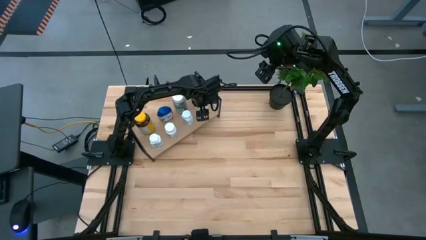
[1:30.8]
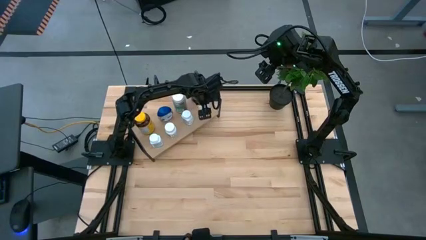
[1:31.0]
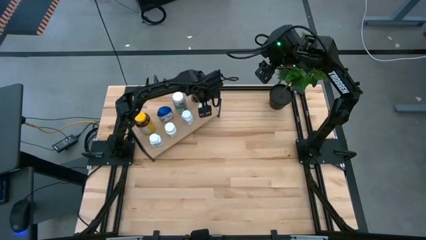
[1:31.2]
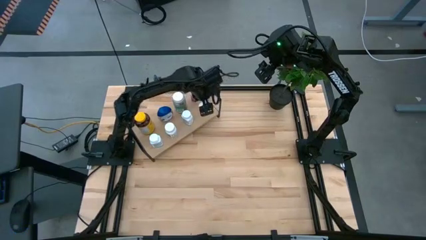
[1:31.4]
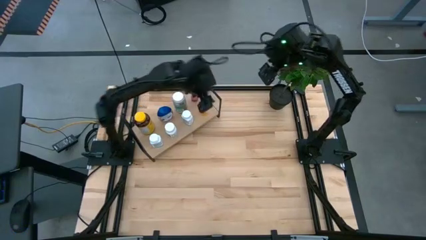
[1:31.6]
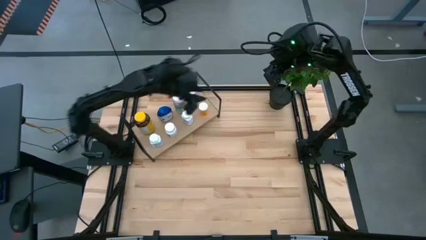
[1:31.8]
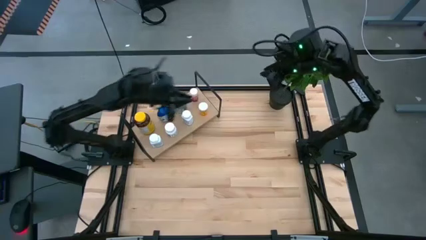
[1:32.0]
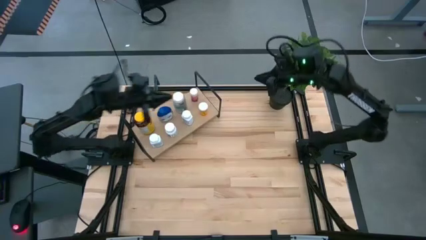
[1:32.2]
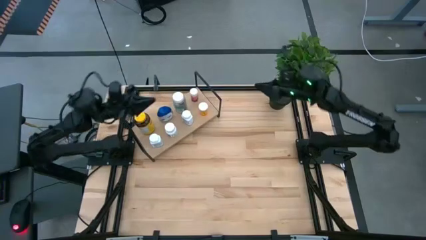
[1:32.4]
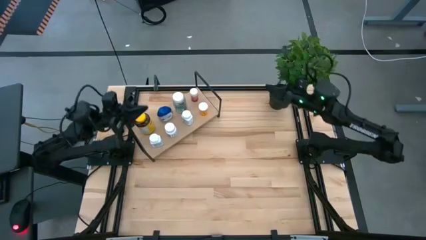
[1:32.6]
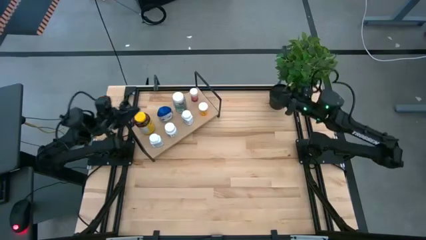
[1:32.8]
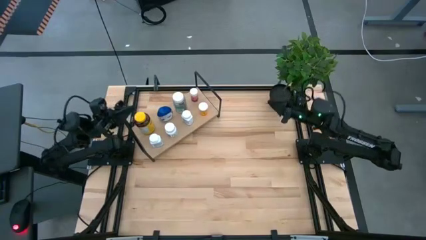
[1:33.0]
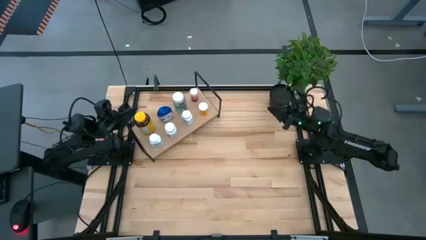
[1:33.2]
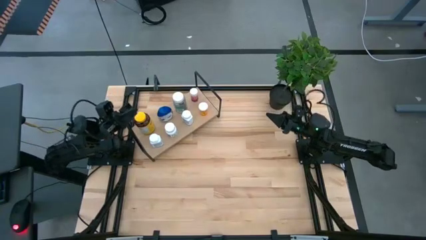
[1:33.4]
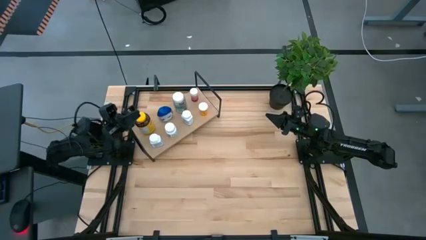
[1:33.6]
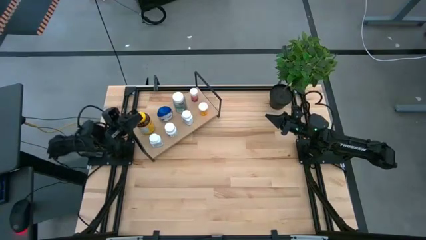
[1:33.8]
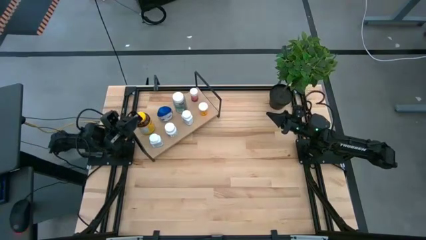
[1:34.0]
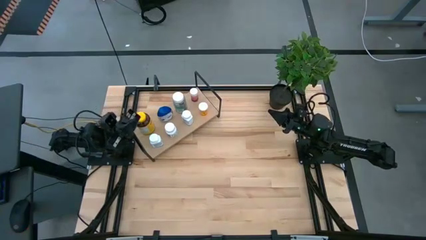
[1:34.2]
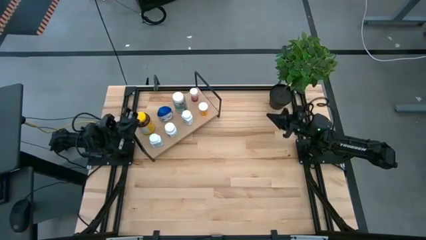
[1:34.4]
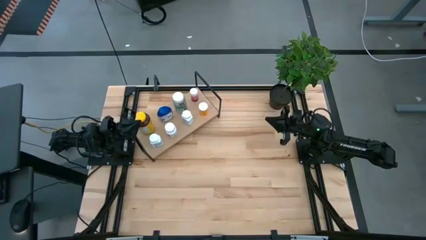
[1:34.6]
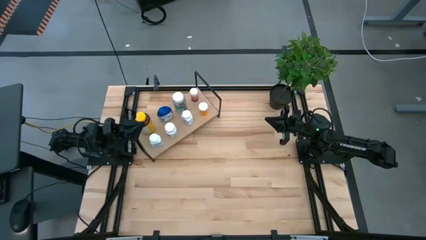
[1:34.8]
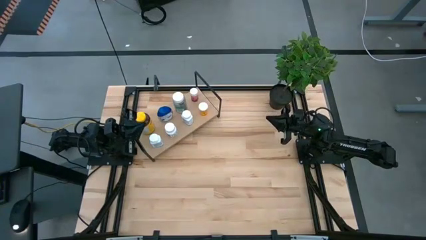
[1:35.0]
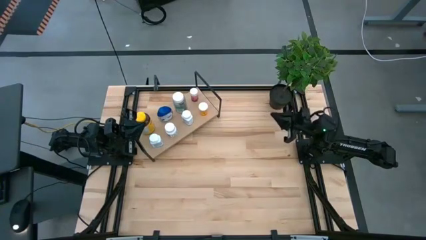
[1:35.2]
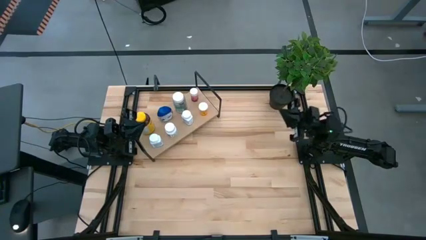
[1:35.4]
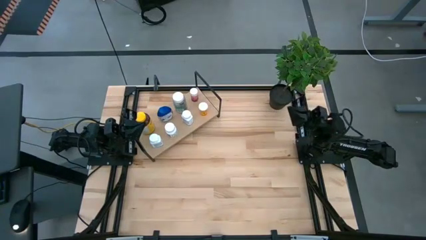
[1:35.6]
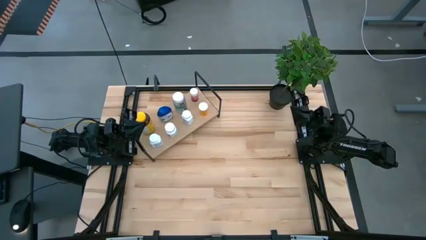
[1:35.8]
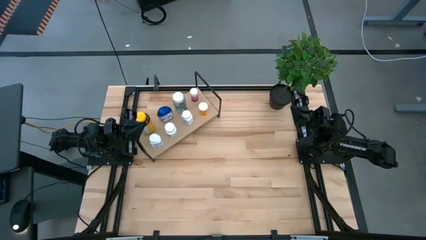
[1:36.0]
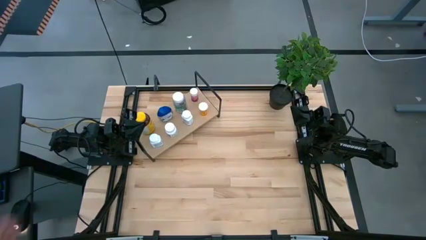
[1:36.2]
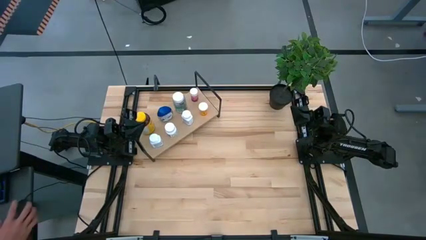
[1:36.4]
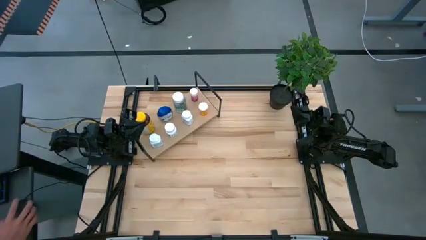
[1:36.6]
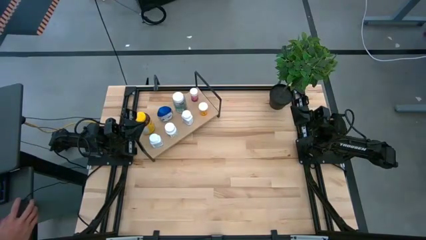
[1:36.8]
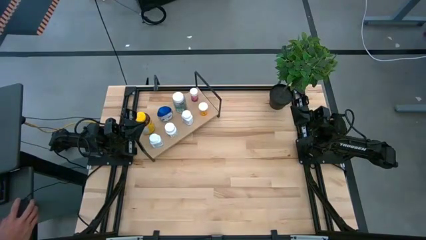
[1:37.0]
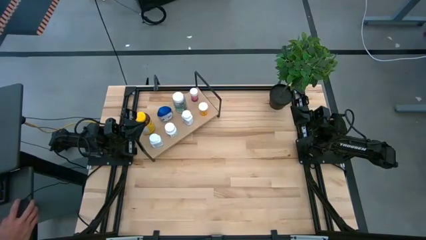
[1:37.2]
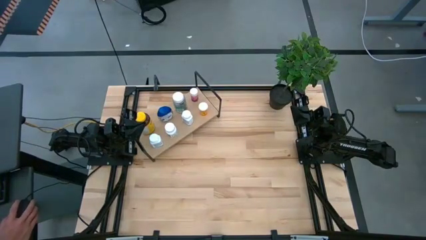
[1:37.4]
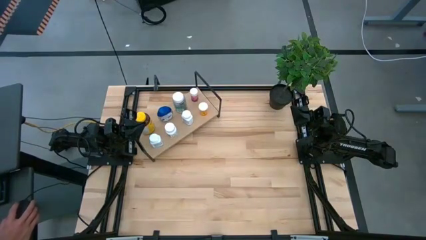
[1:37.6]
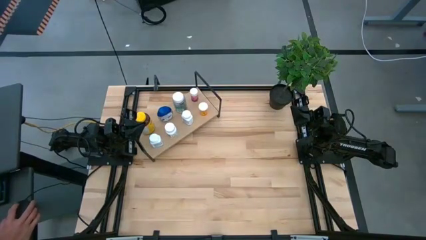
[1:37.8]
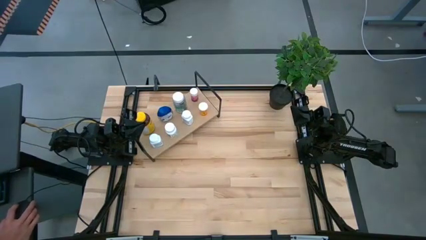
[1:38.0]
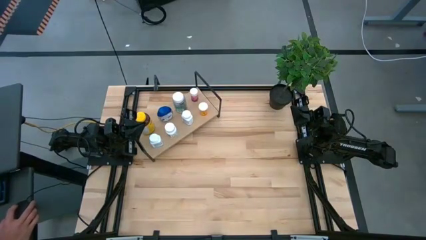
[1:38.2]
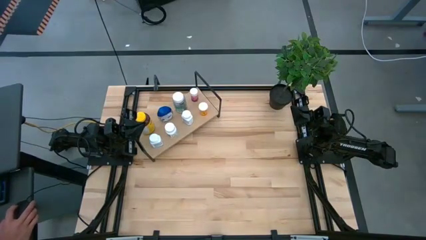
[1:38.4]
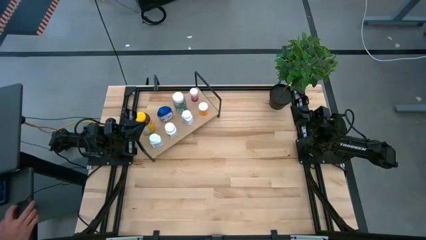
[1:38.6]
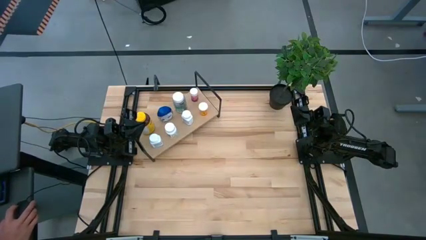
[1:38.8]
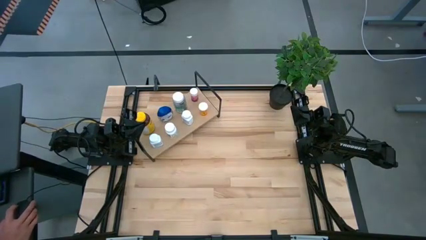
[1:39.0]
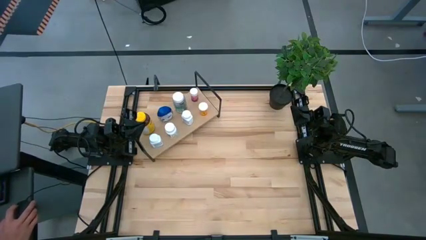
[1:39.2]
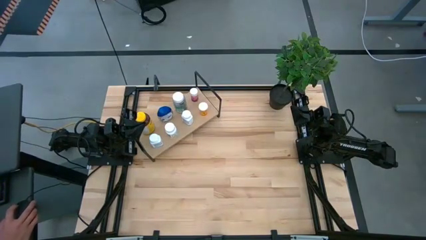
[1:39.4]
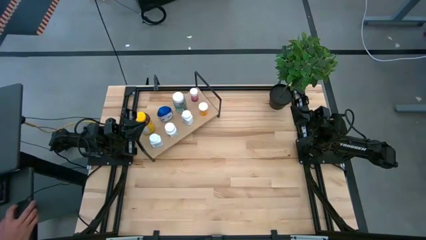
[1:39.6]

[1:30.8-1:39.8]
Task: Pick and place medicine bottles onto shelf by color
Return to Home Position

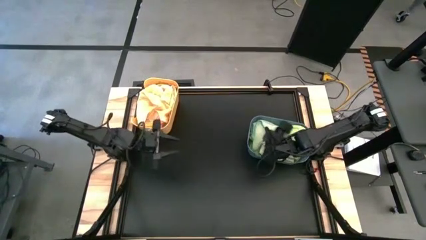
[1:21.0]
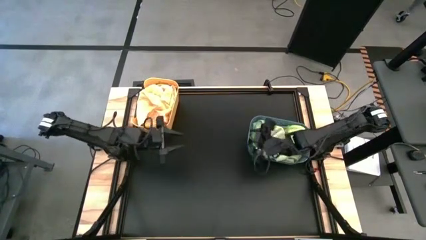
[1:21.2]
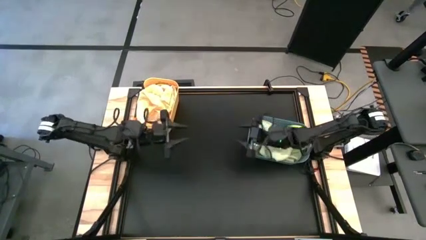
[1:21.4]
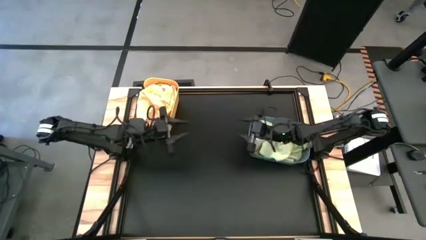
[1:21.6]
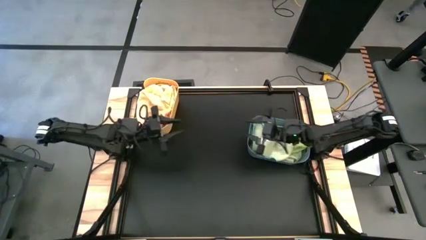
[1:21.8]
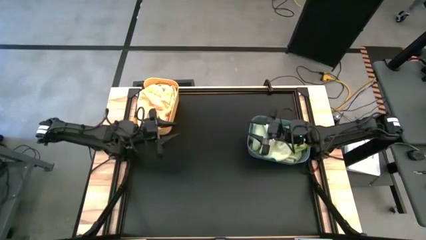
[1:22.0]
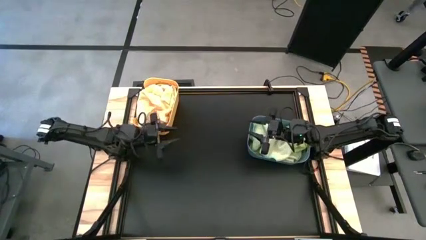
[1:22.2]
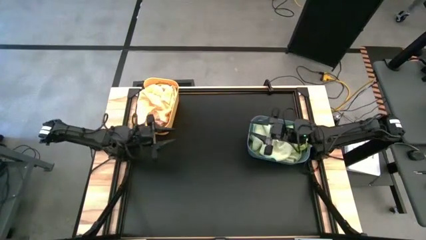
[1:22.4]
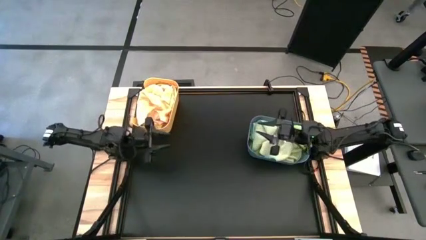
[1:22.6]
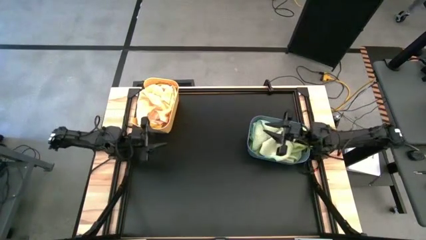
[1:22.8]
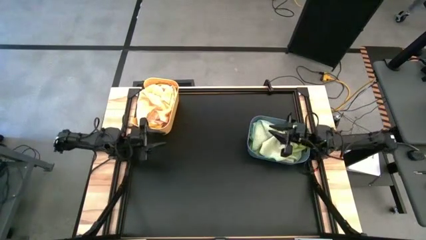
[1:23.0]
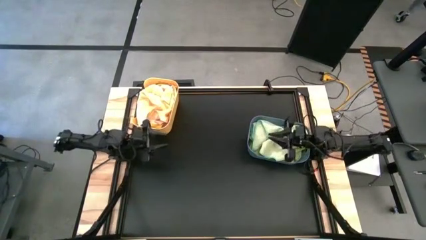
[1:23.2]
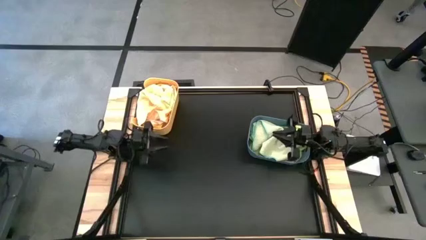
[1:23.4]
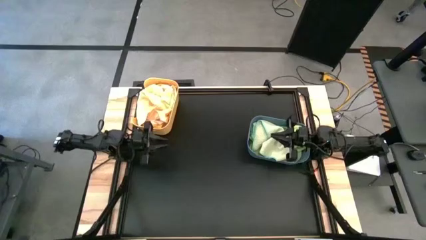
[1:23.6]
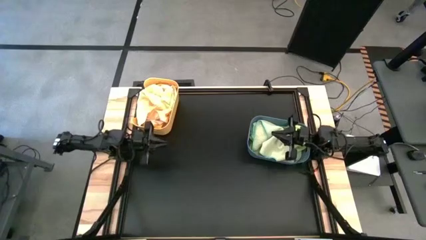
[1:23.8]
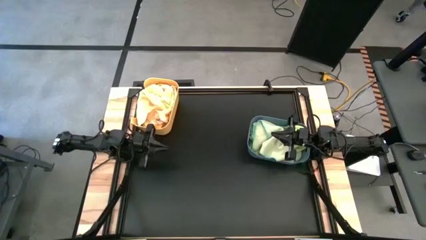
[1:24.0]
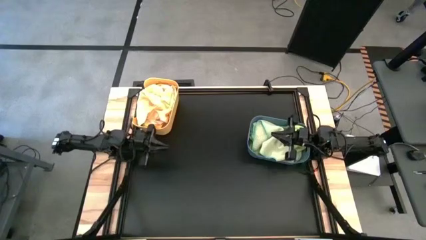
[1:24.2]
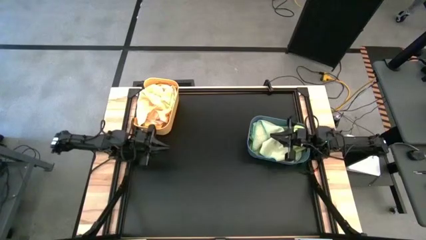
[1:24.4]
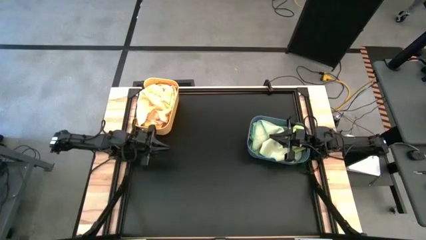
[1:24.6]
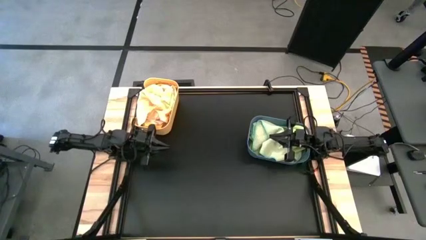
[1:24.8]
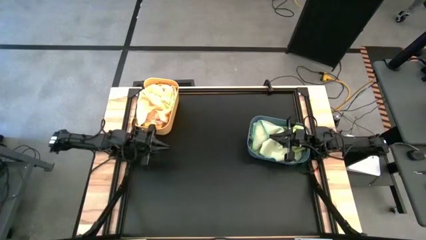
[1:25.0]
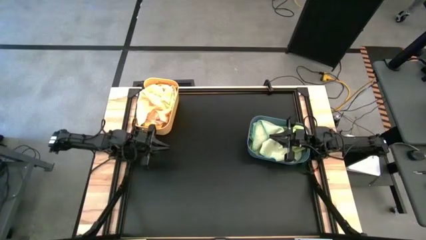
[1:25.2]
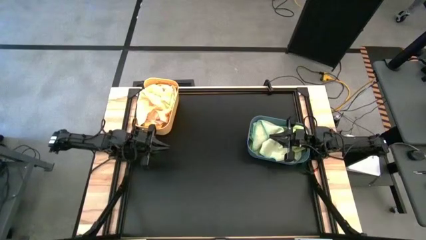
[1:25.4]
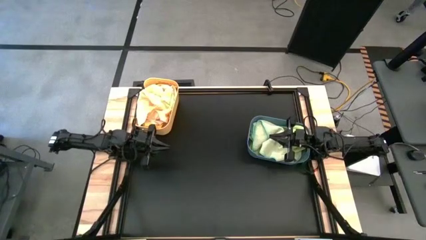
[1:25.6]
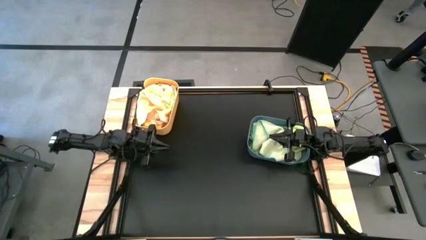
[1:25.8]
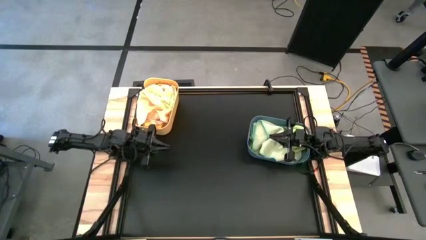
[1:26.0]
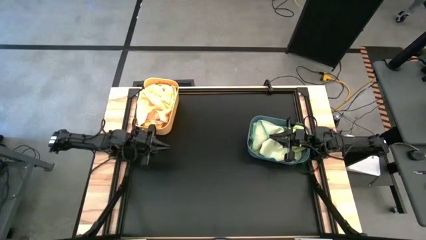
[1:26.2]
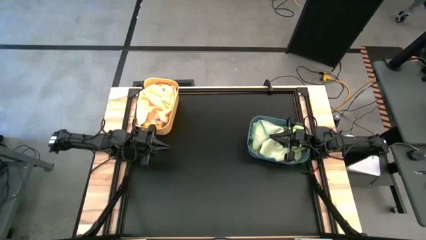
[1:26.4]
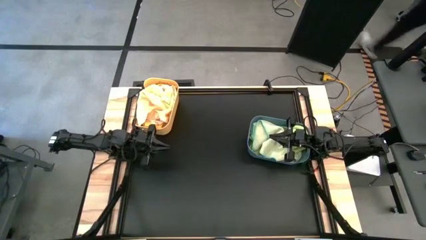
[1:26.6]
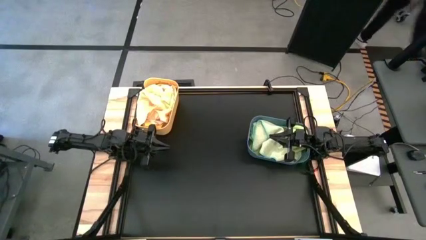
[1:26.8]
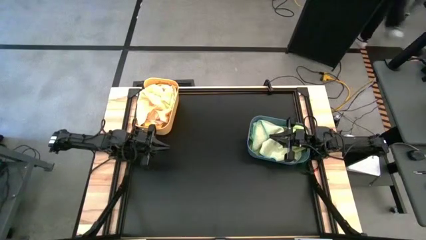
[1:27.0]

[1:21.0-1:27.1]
Task: Sort towels by color in basket
Return to Home Position
